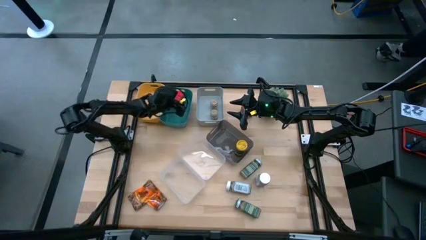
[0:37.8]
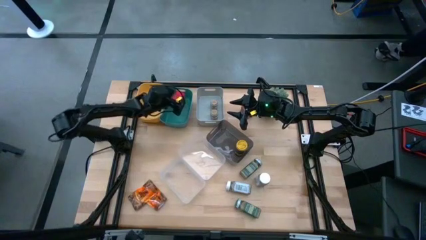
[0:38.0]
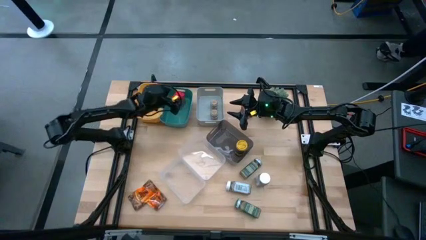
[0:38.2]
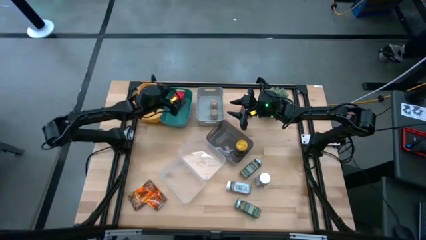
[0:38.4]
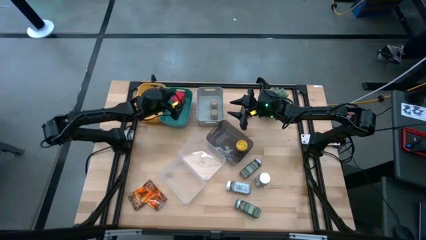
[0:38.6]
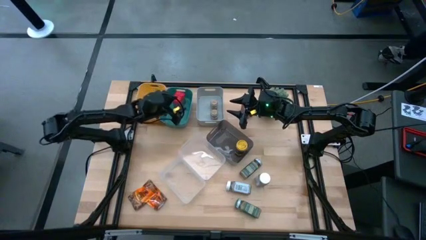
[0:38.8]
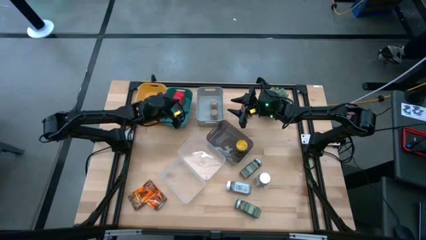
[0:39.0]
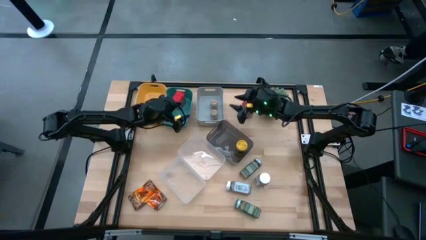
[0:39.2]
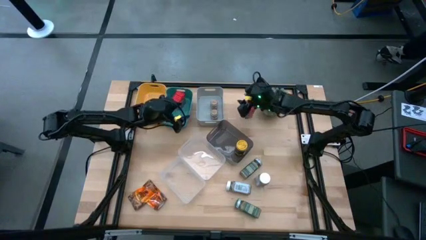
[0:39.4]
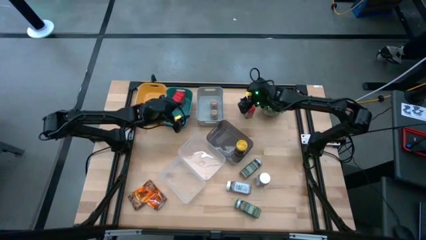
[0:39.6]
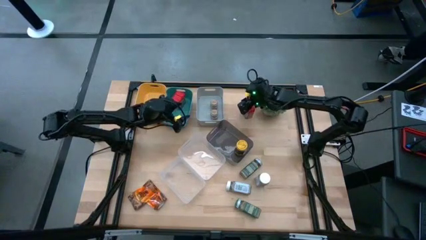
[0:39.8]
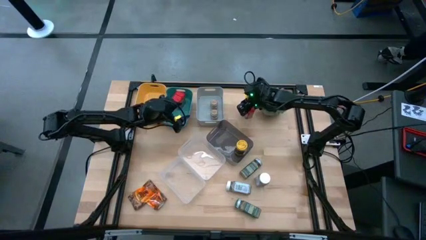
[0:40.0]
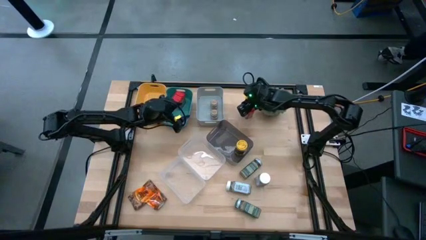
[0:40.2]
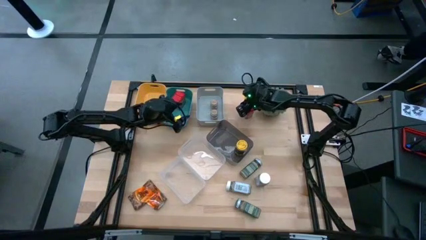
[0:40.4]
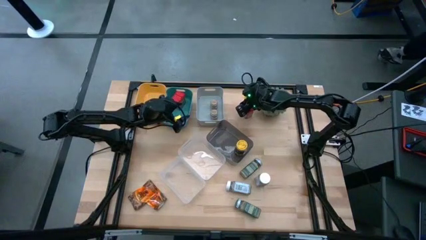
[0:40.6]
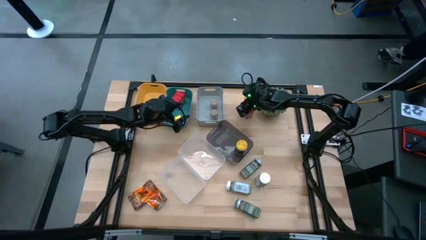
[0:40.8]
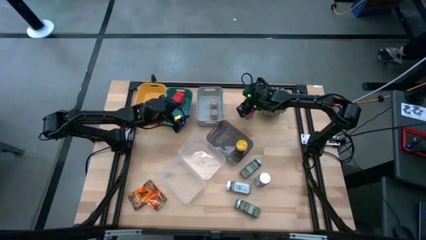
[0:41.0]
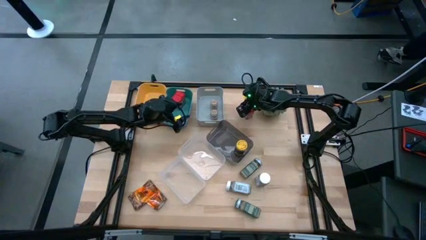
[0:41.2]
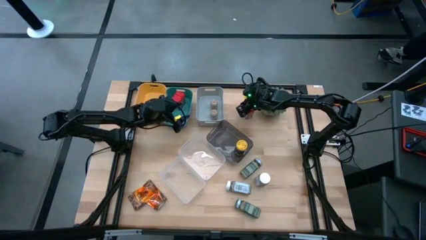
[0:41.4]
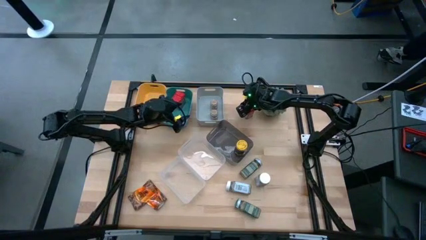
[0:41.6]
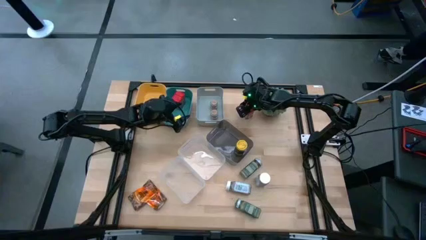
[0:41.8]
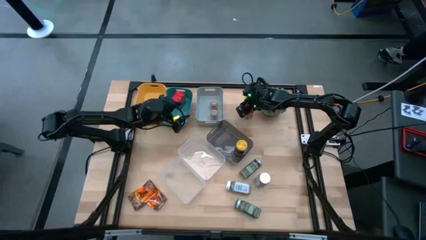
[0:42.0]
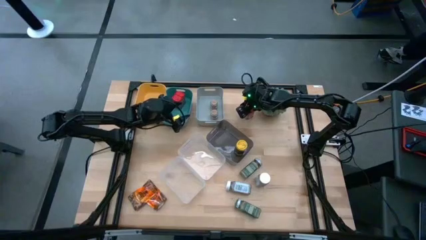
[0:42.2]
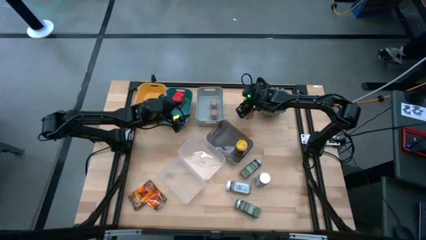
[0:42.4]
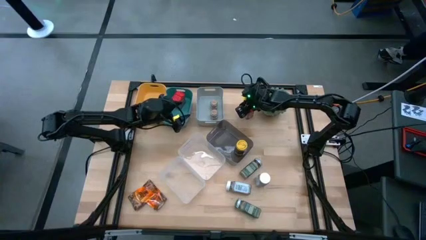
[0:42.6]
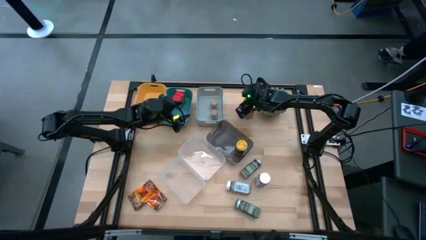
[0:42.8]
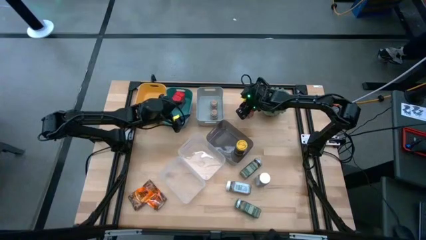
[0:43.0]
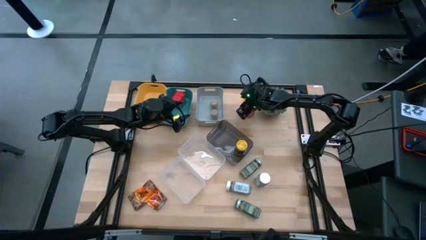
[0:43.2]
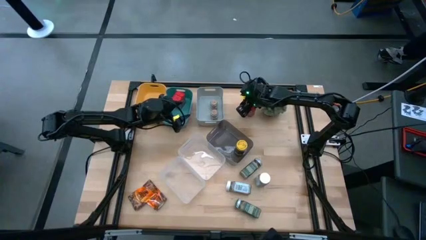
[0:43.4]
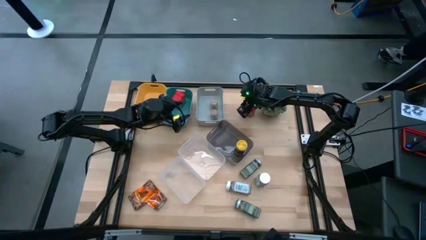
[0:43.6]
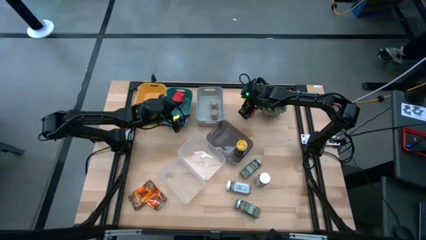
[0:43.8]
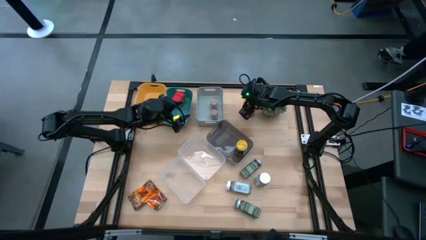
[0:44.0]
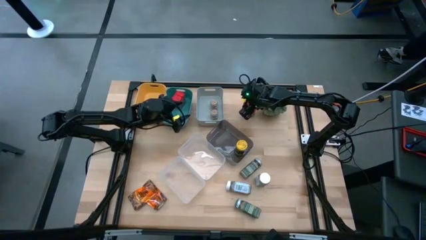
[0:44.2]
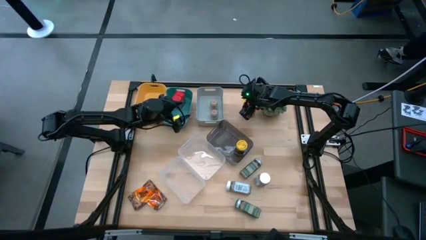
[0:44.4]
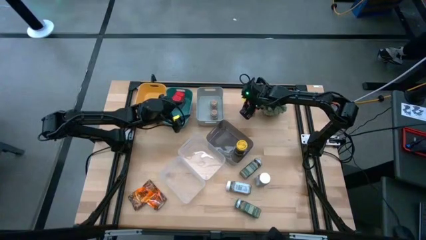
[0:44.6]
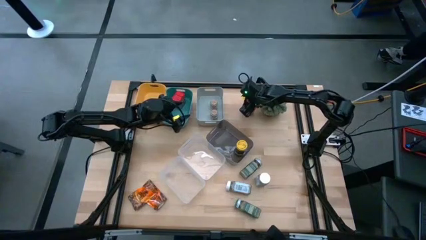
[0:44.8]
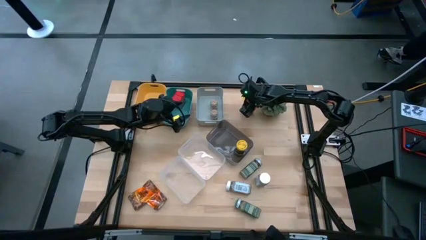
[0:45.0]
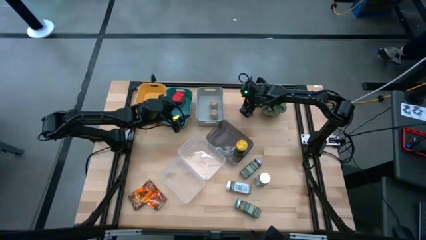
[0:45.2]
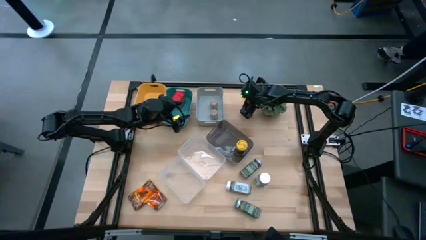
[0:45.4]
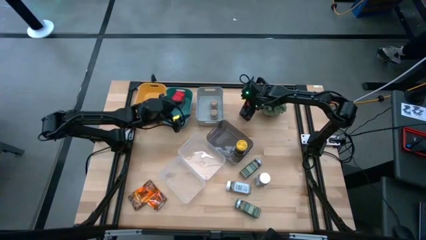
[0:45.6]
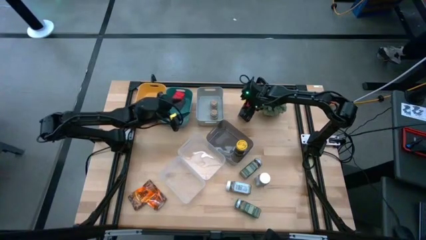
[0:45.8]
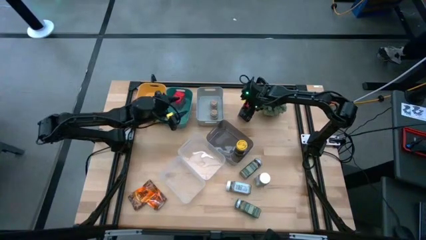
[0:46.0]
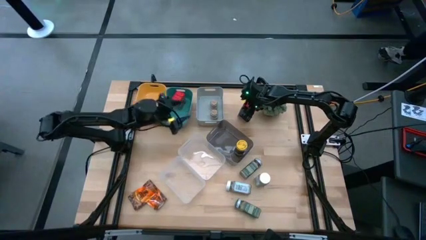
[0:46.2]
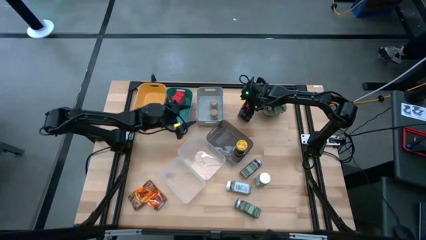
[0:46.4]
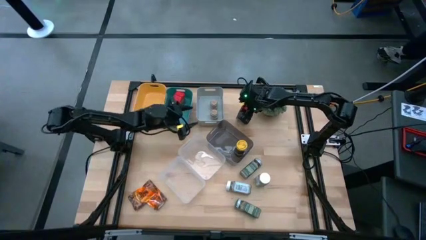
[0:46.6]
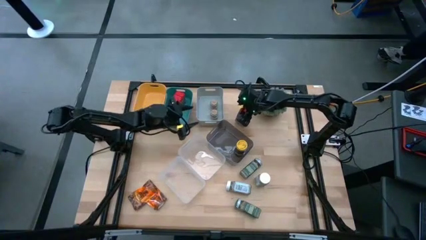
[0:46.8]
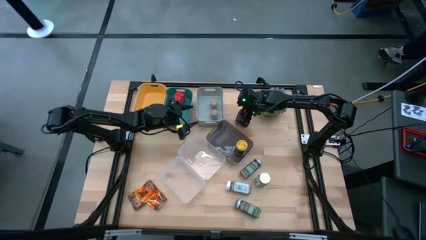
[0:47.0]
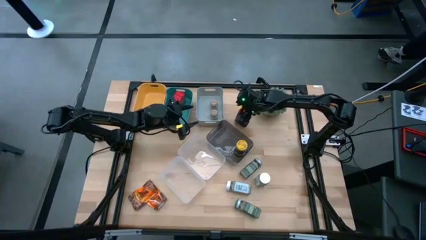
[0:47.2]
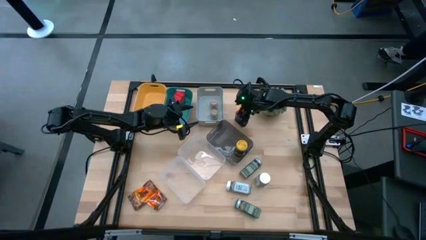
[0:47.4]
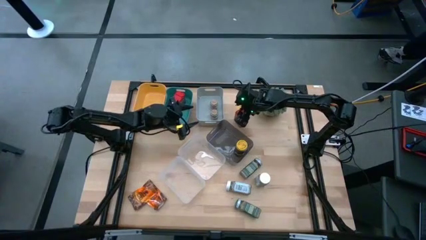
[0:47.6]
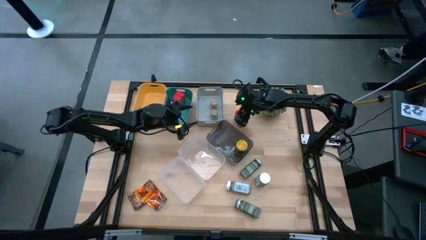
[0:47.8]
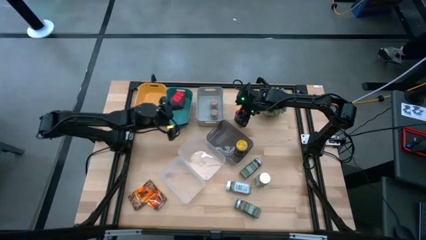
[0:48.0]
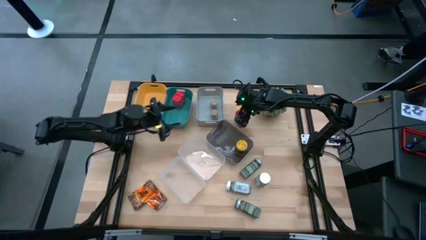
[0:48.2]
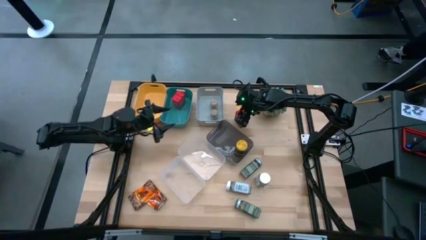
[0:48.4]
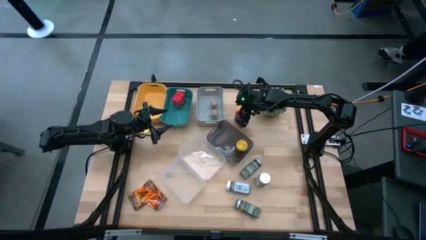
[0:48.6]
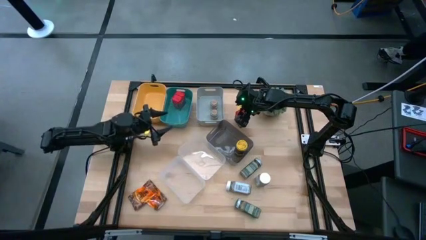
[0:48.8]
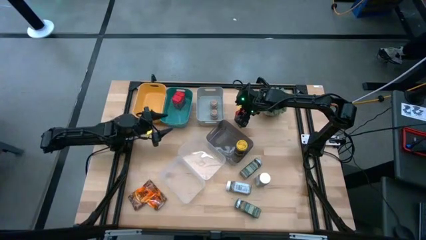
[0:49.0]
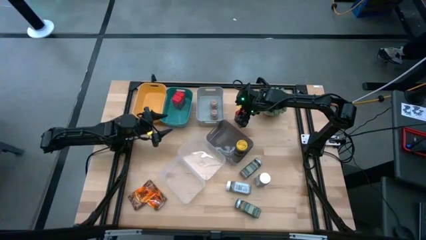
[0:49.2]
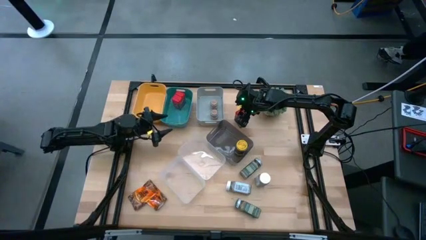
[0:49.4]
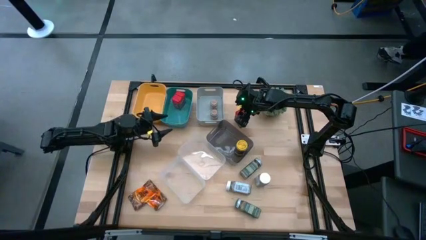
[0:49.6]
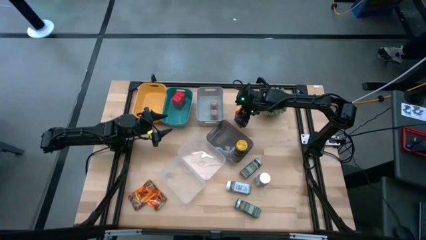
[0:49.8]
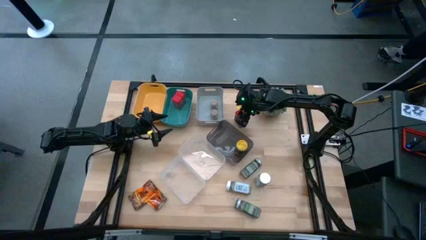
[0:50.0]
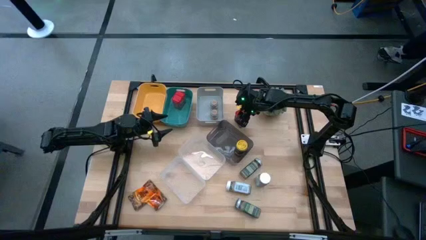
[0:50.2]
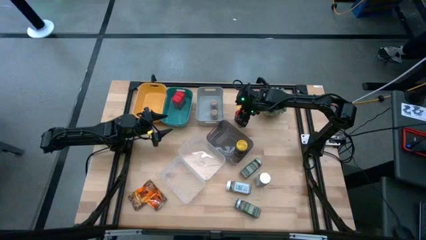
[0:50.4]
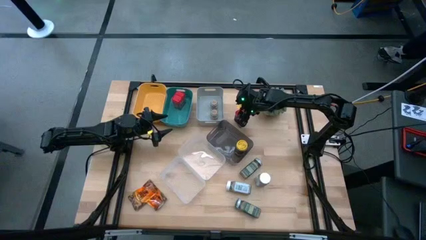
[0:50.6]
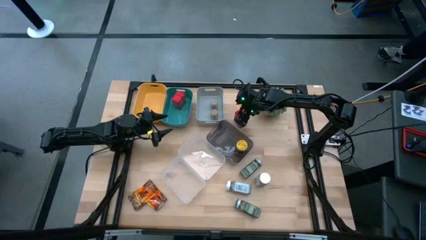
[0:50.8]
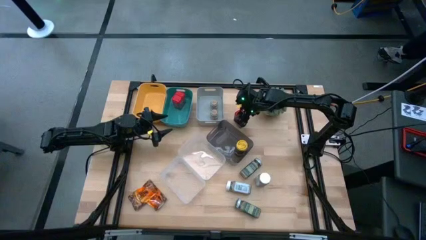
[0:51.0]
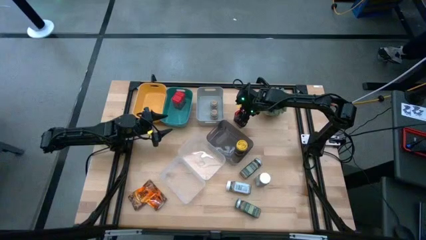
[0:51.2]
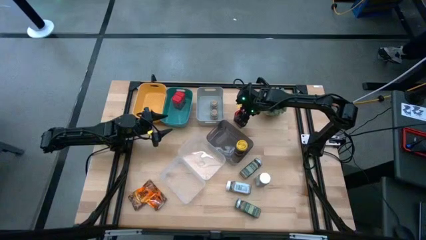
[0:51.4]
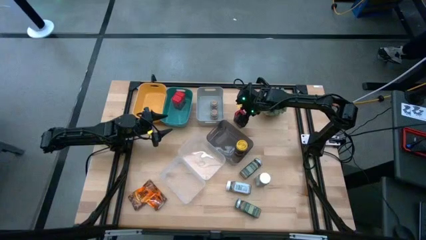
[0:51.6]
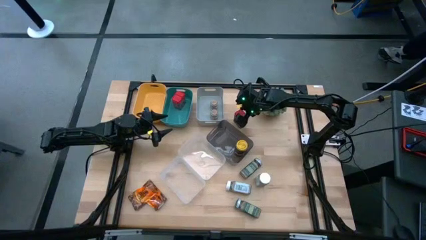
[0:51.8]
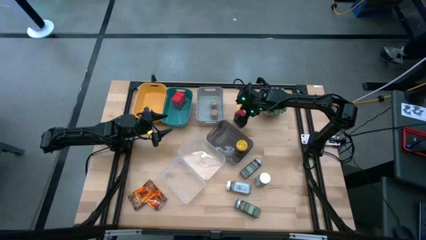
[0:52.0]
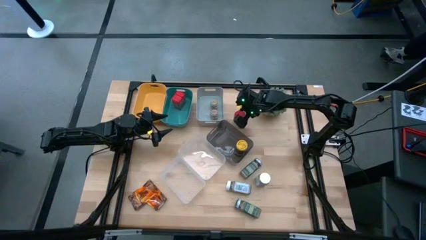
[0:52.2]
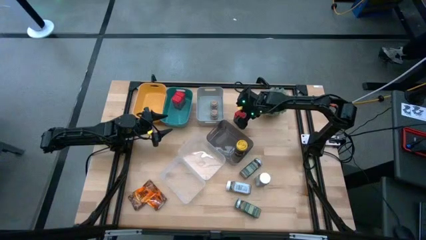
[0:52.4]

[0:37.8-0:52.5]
Task: Sort spices by type
Put the red seasoning can into the green bin
